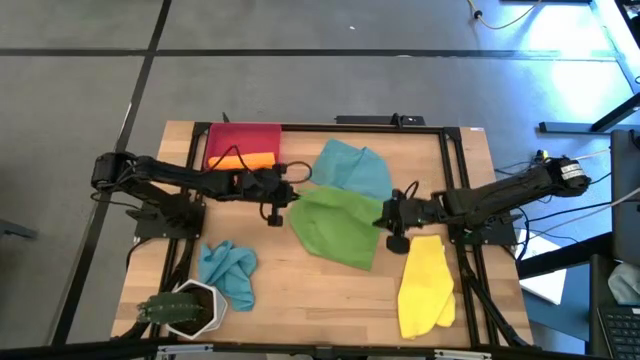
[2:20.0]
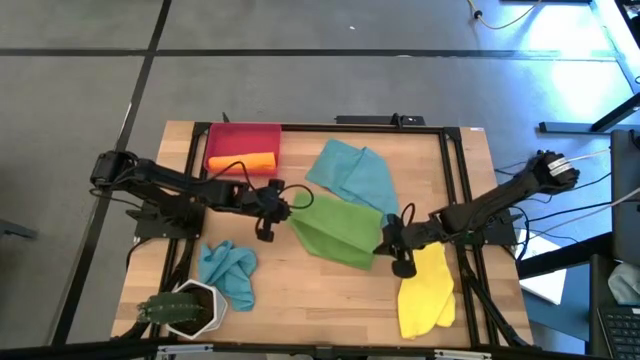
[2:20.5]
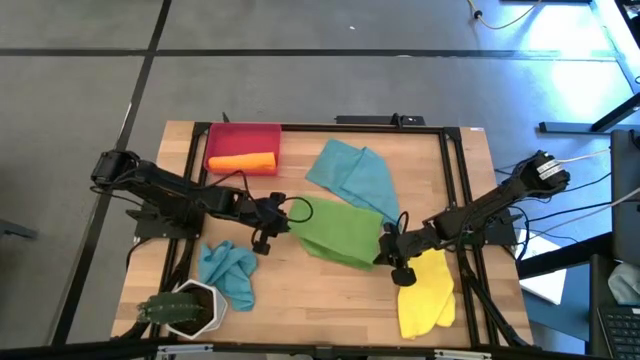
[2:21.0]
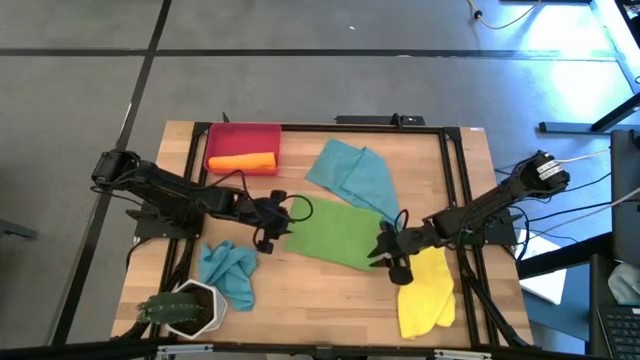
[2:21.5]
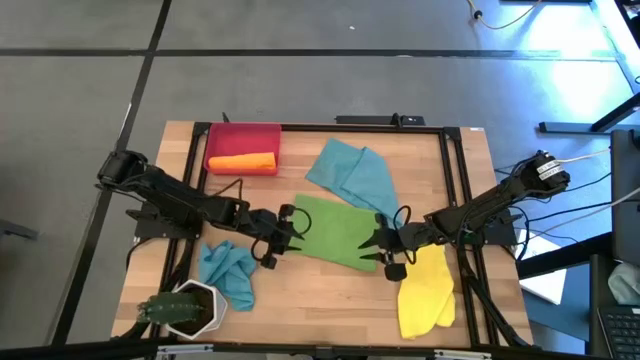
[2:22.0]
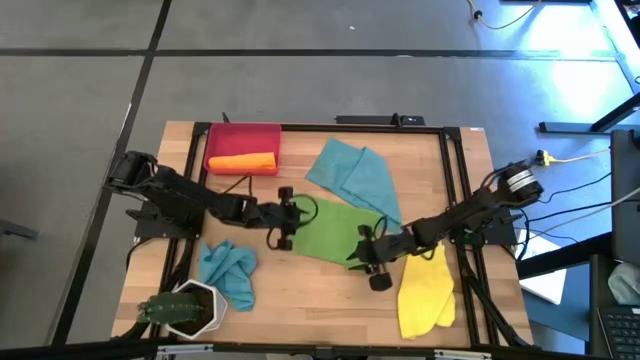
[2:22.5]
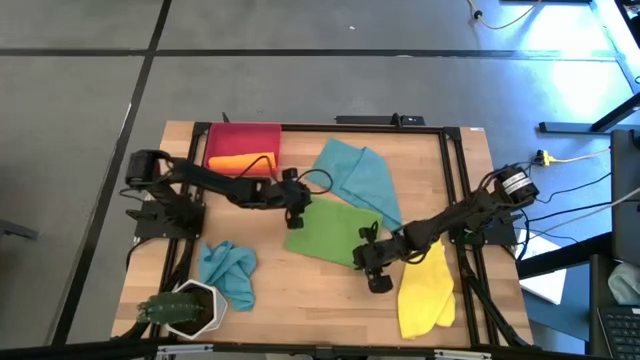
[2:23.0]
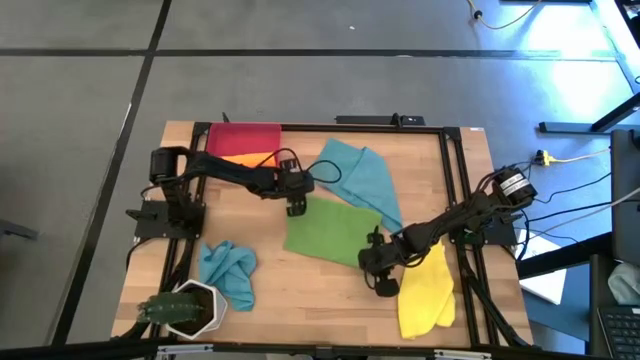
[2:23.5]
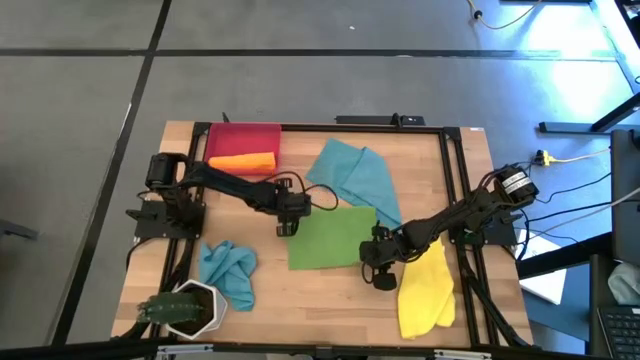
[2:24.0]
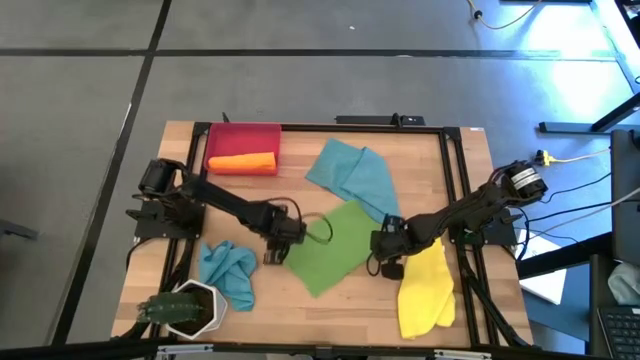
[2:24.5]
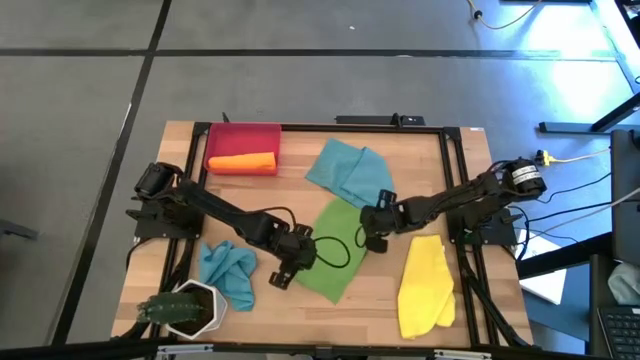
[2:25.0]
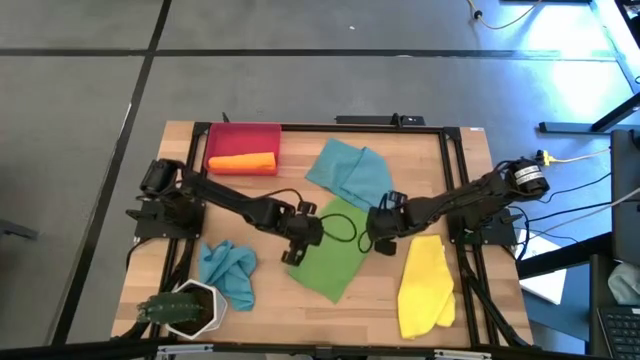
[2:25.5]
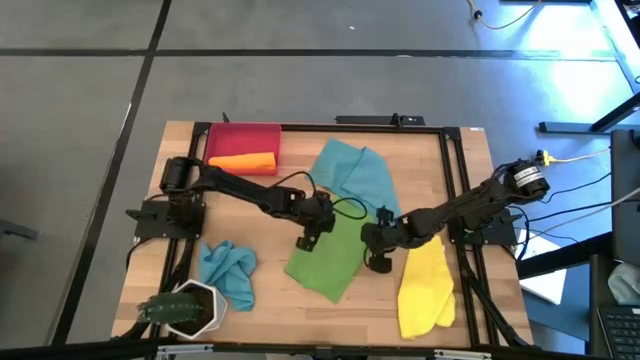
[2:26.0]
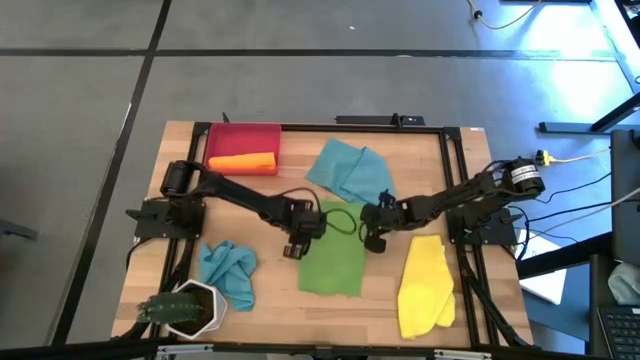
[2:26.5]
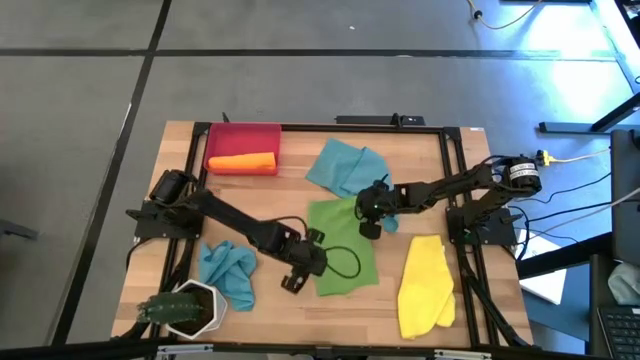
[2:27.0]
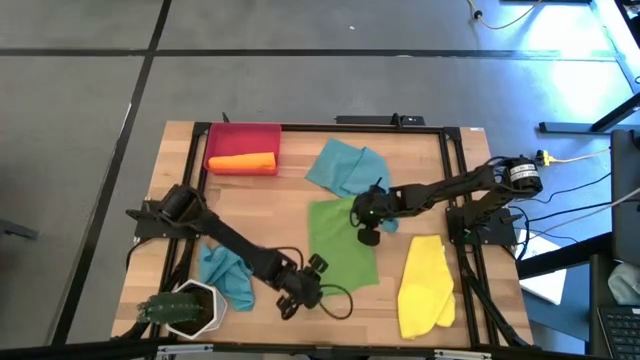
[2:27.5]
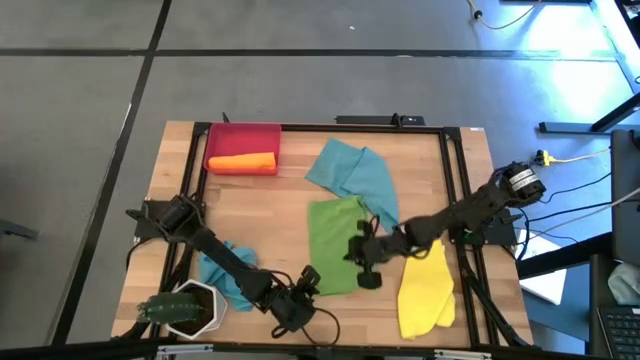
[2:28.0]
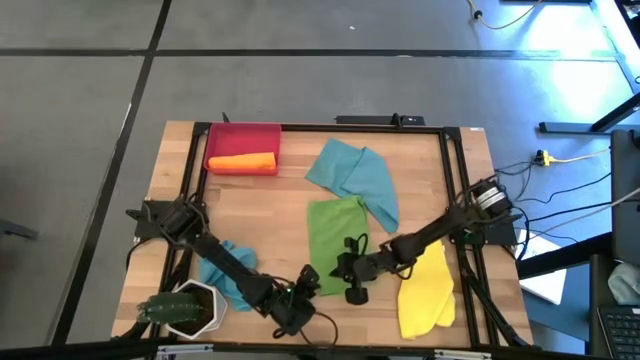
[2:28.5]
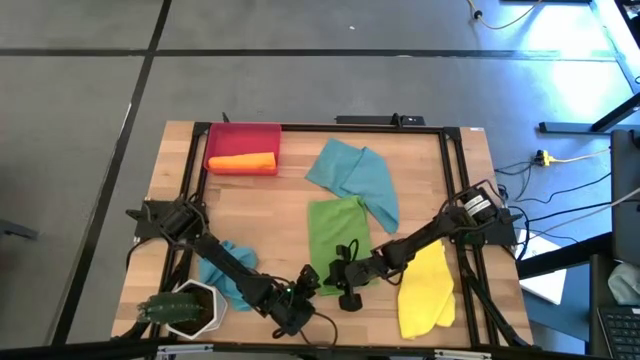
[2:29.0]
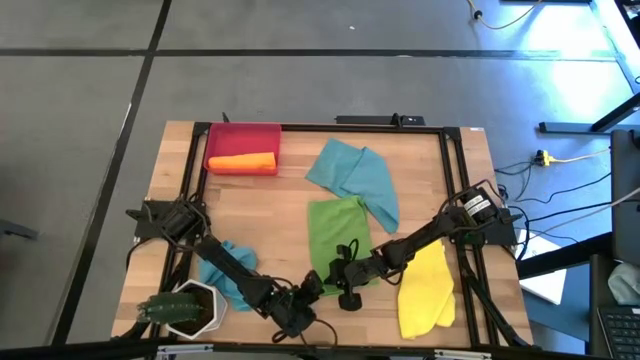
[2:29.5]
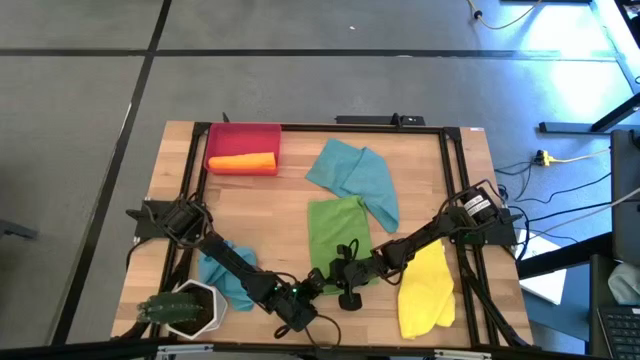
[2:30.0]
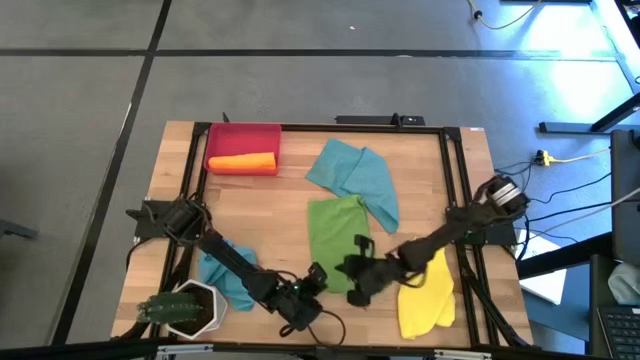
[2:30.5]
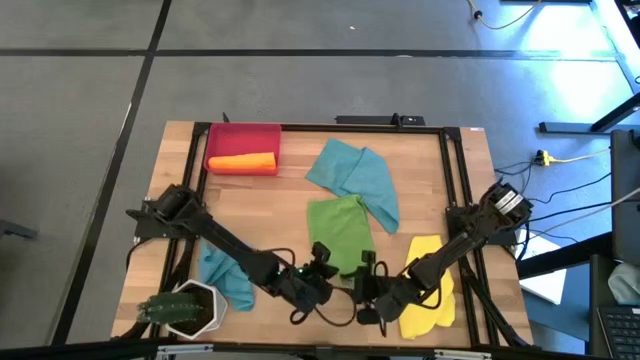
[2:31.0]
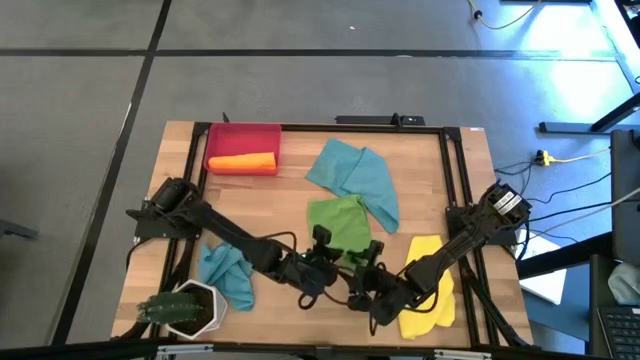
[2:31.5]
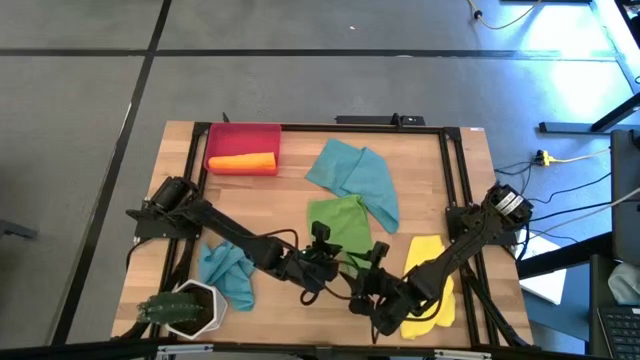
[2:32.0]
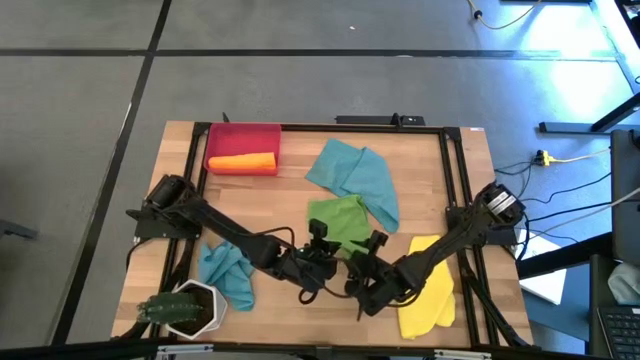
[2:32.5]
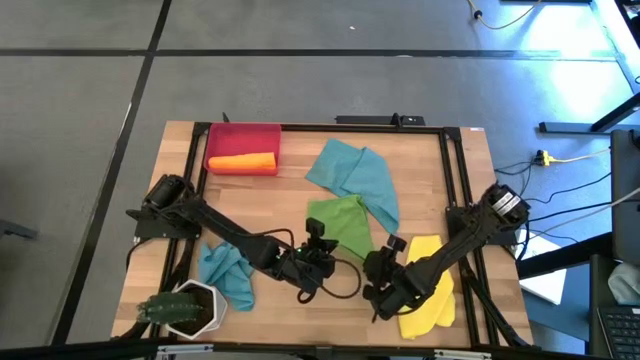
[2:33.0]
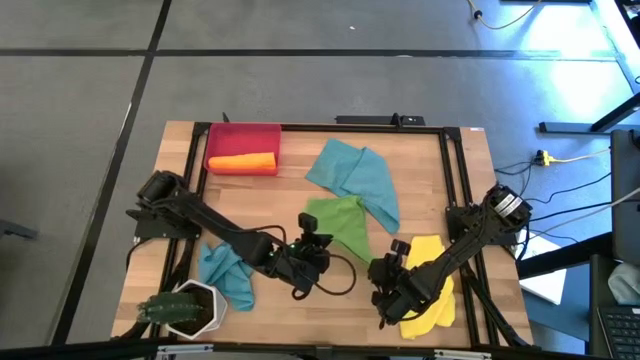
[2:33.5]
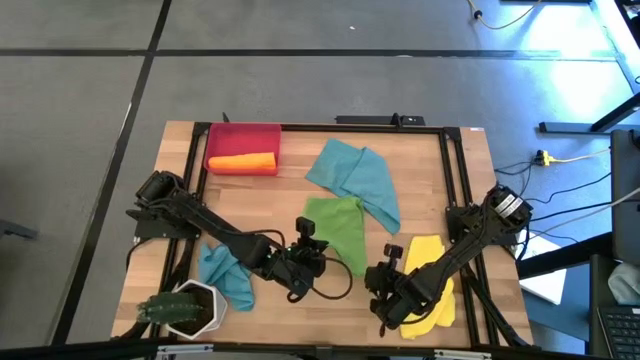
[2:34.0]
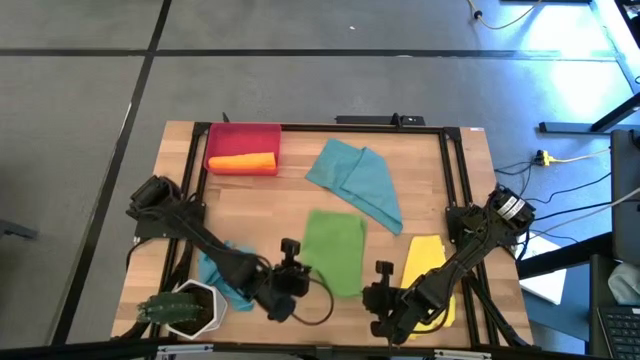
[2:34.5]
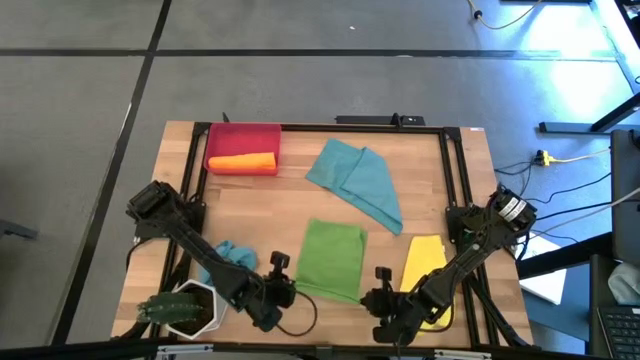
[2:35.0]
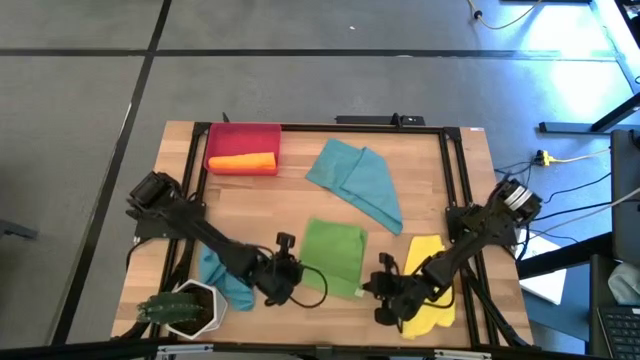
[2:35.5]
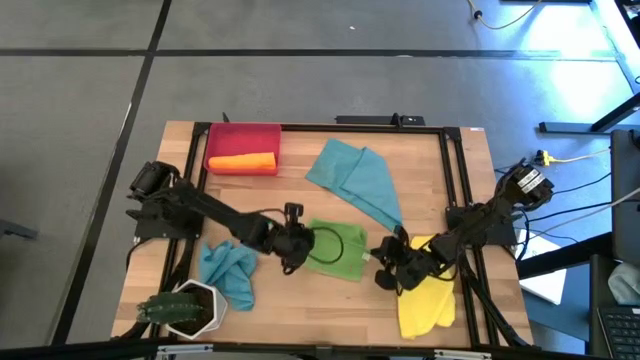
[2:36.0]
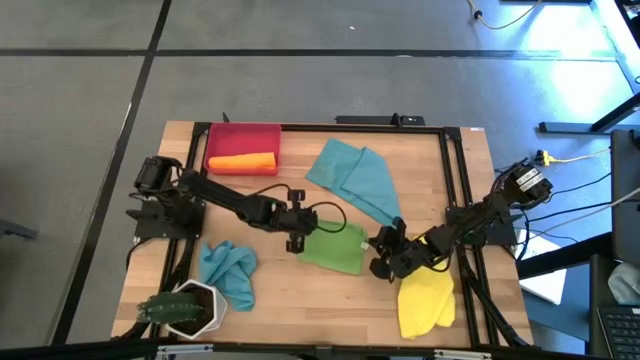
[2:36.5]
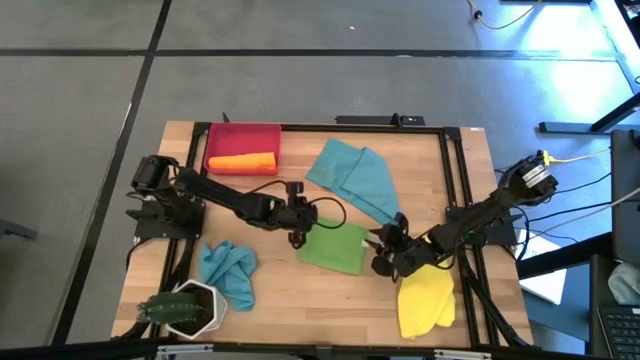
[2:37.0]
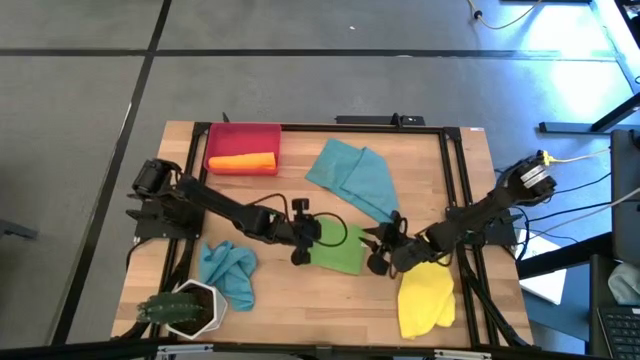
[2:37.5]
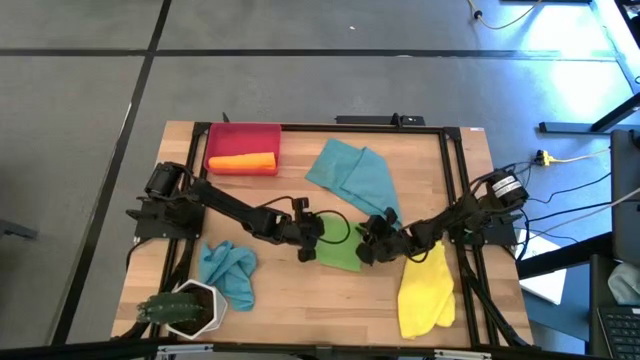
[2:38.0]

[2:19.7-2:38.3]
Task: Roll microfiber towels into tight, uniform cylinder then place into a basket
Fold the green microfiber towel

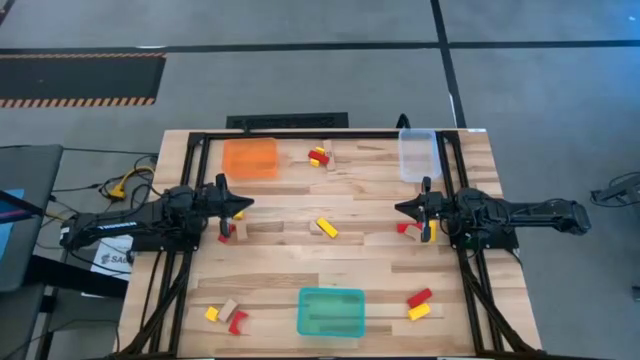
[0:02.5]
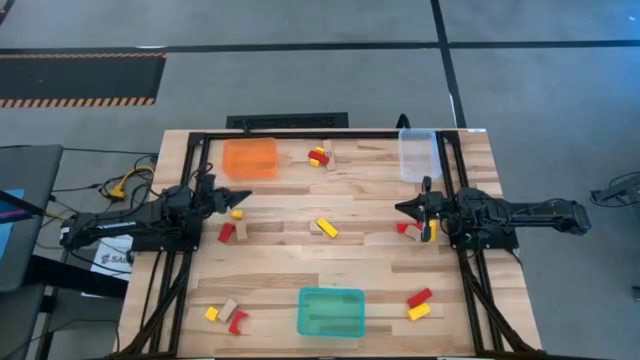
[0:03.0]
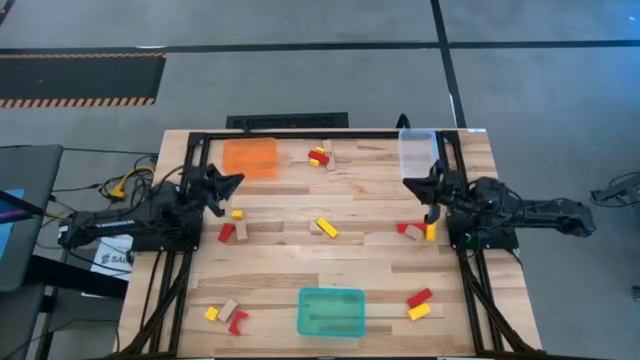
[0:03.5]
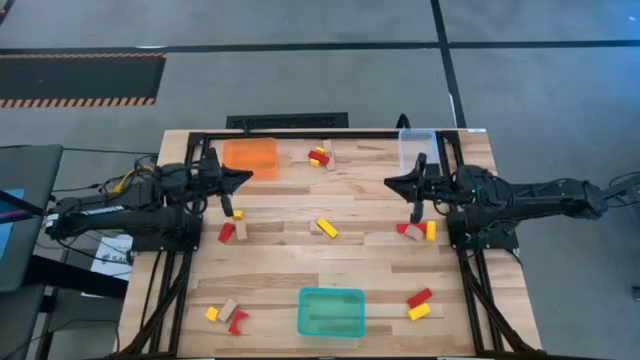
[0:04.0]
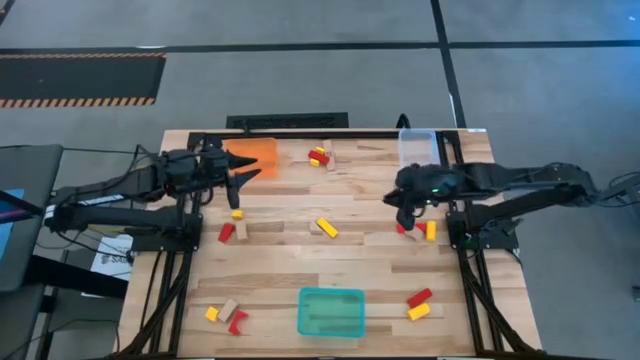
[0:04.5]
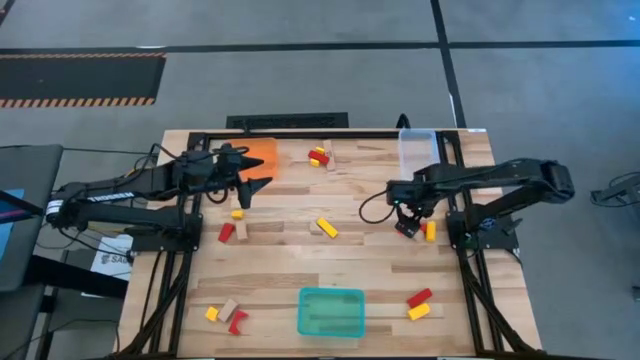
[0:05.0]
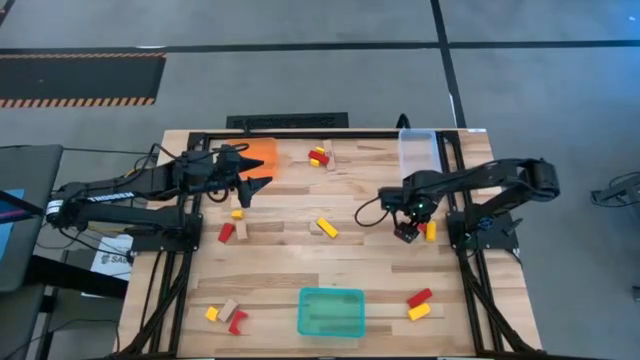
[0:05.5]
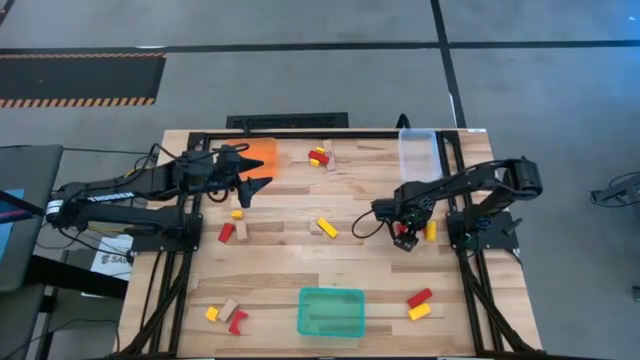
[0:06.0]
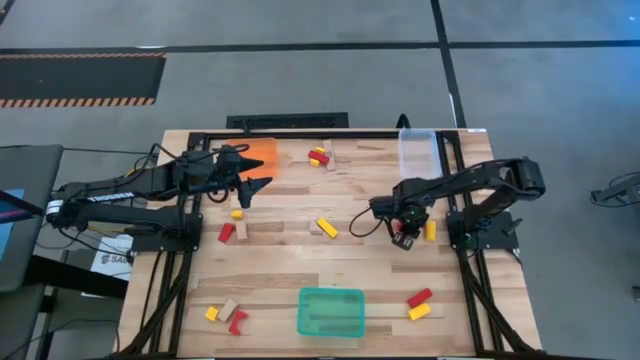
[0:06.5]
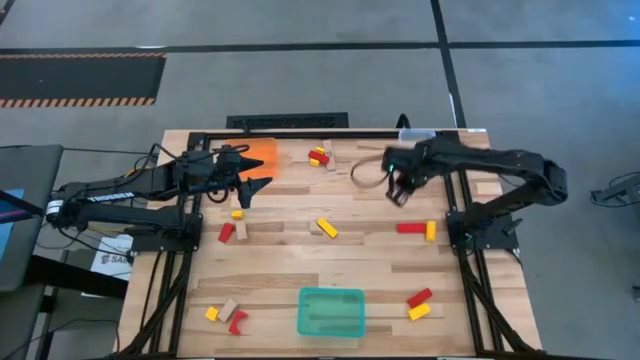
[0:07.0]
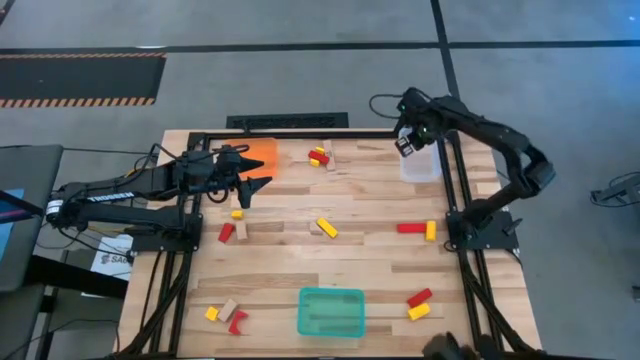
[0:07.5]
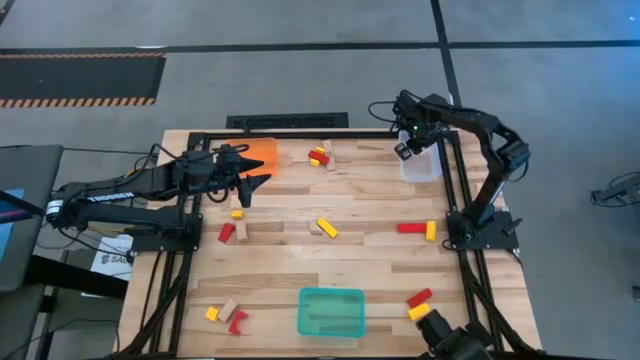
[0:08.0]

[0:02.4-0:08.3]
Task: Sort & place blocks by color
Put the brown block into the transparent bin
